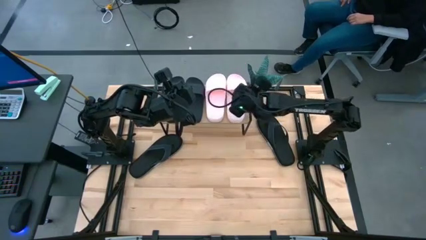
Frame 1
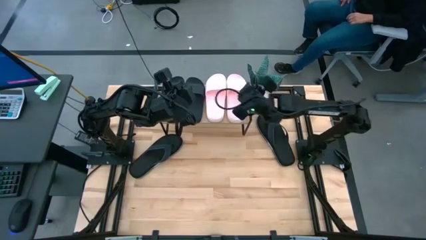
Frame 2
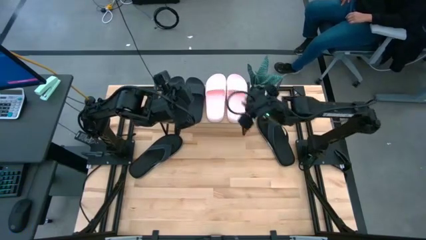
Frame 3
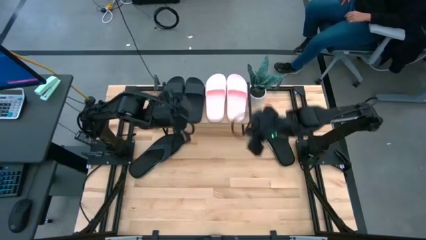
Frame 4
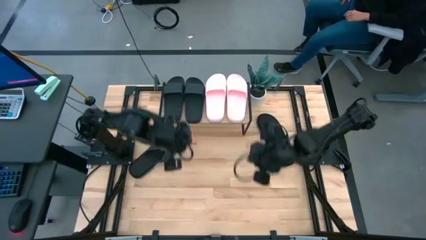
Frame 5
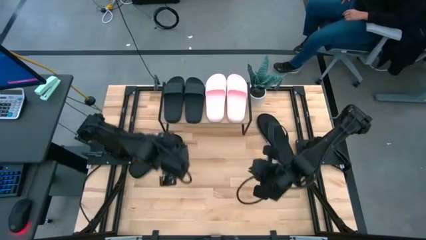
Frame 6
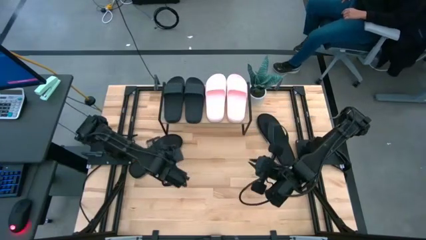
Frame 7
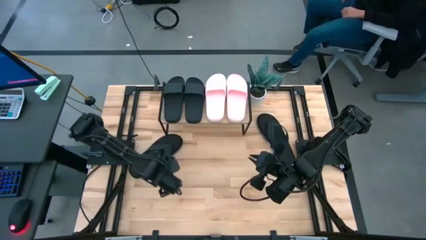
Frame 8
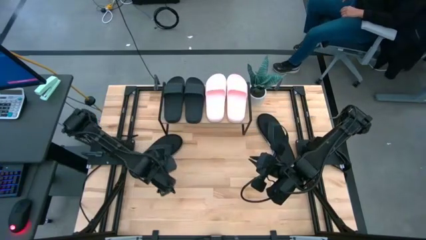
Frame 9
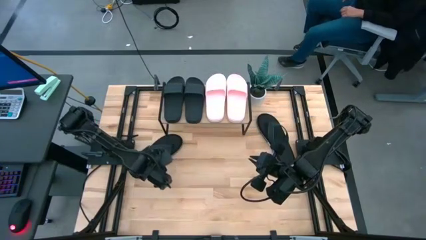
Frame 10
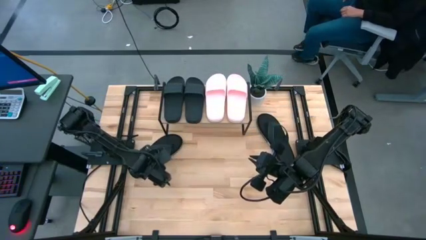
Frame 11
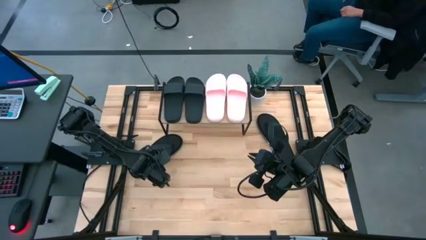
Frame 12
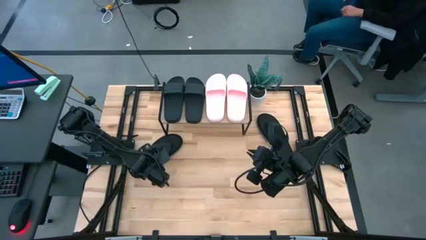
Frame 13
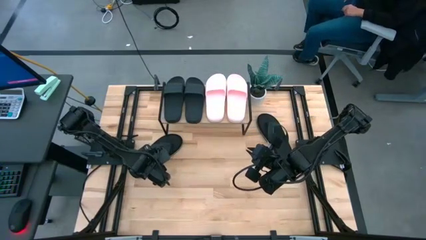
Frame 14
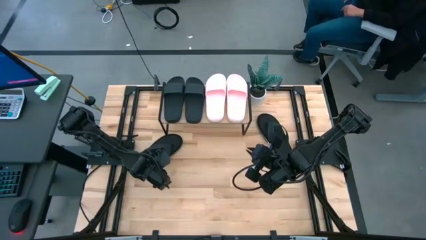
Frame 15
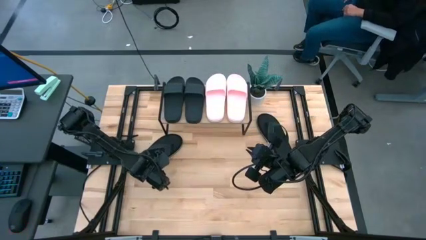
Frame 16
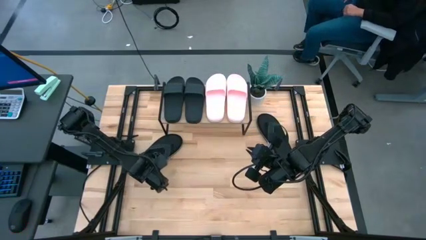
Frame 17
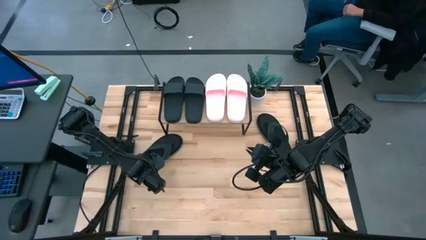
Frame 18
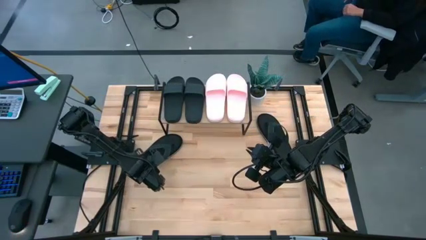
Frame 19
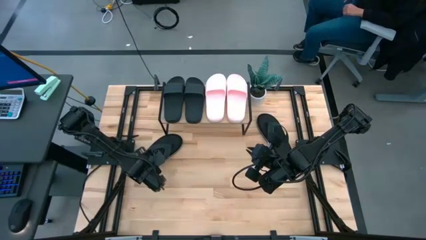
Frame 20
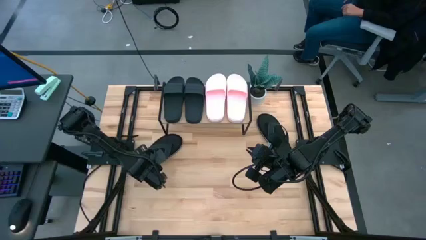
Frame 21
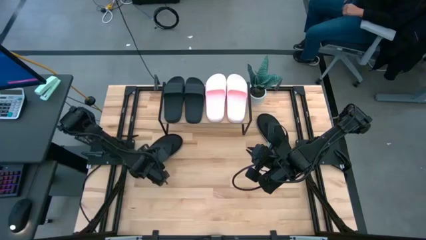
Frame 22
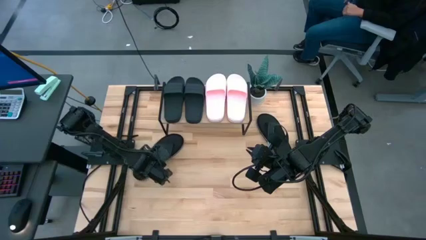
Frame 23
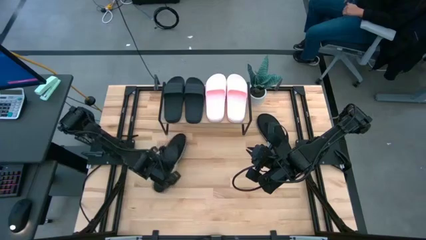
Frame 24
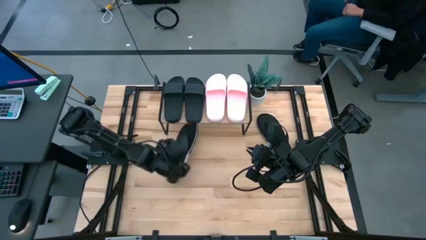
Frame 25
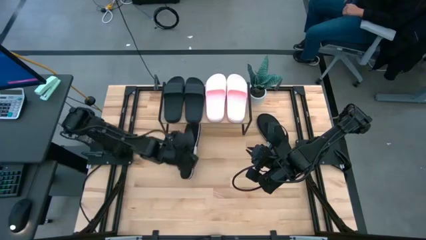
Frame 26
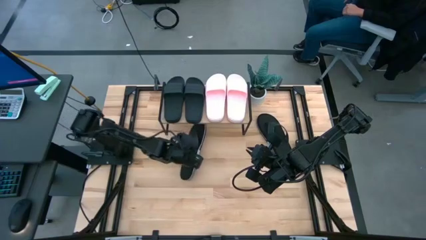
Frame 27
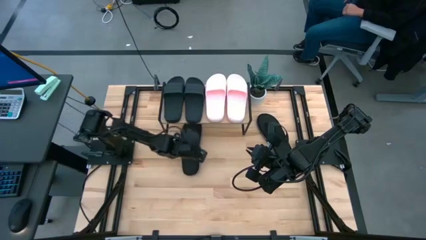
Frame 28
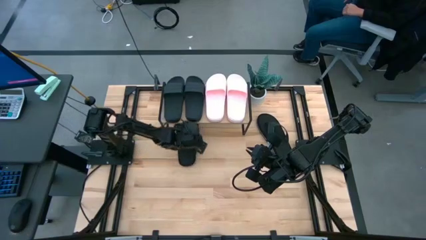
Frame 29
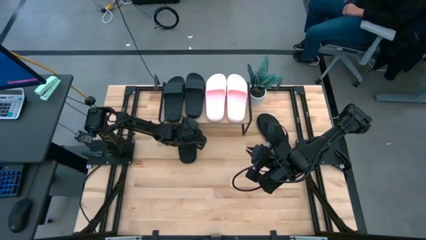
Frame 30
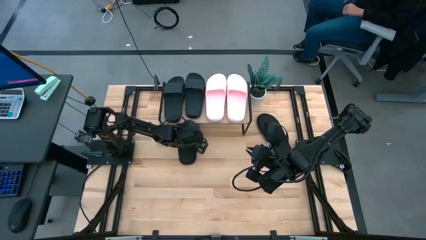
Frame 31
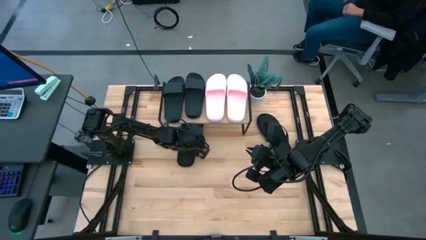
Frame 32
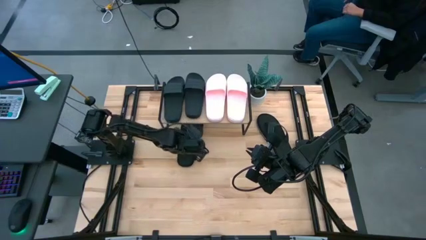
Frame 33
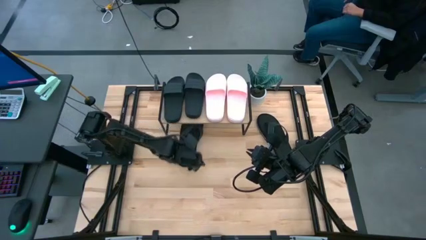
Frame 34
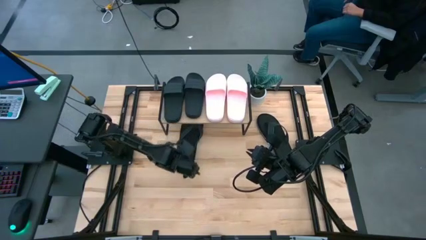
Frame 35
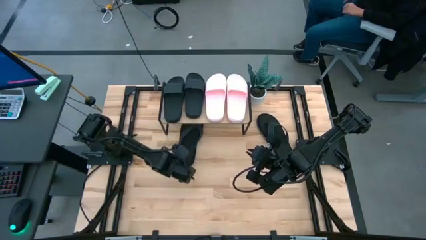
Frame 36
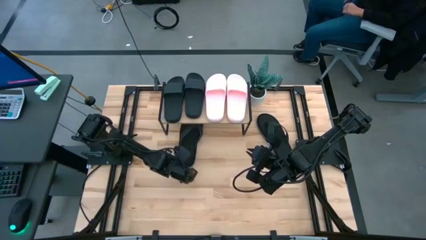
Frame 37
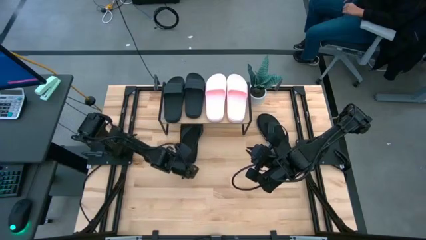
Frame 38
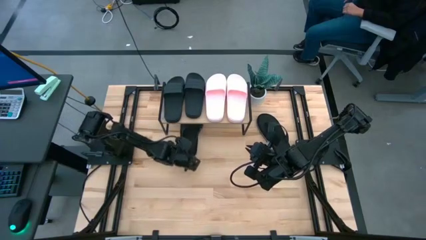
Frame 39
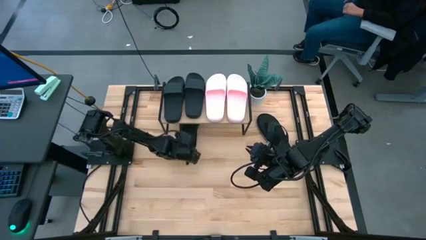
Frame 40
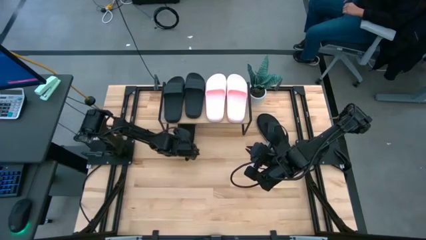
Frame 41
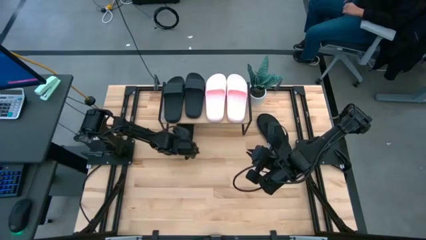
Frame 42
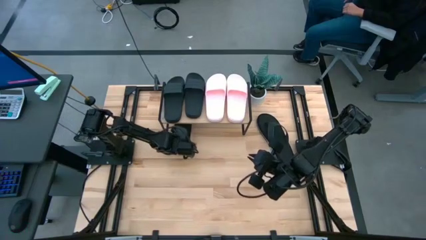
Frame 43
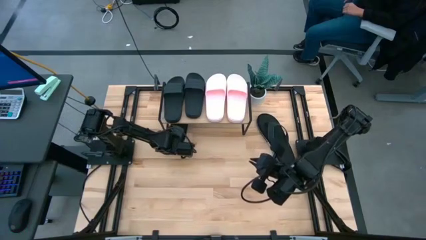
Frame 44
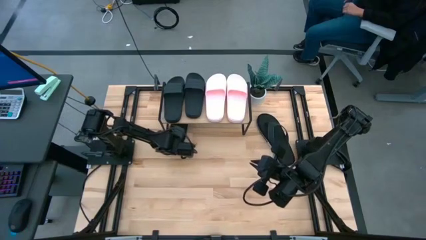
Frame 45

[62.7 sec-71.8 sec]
Task: Pick and place slides into the shelf
Put the left black slipper under the shelf

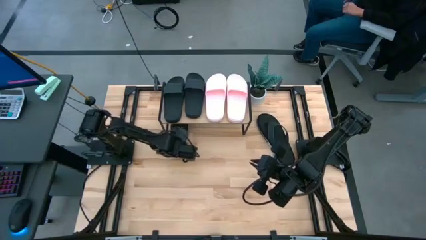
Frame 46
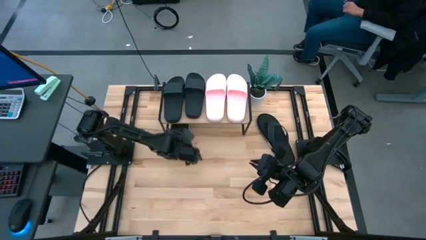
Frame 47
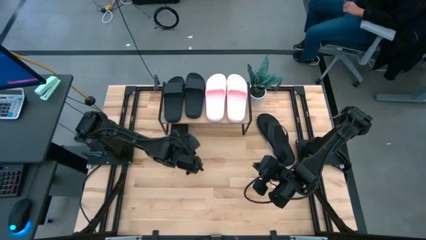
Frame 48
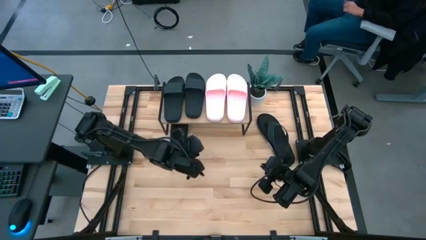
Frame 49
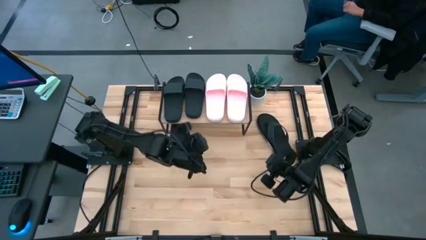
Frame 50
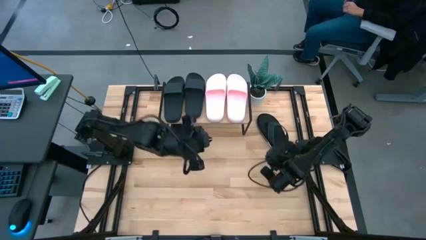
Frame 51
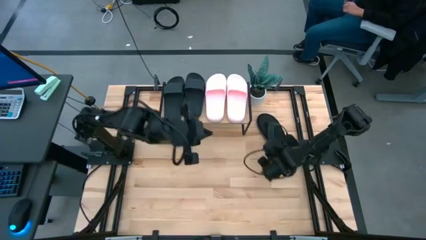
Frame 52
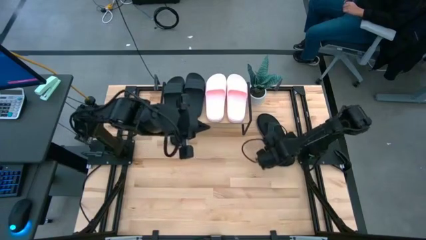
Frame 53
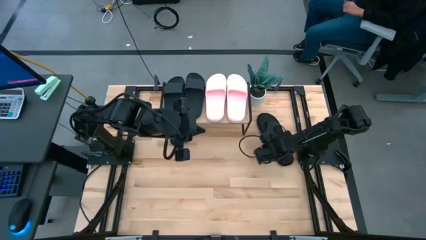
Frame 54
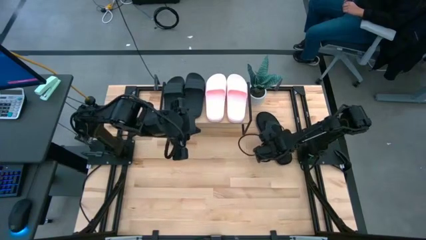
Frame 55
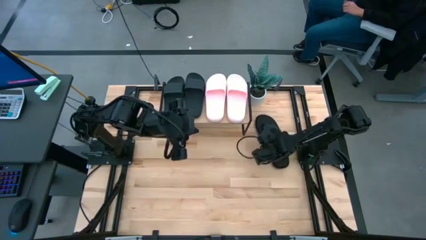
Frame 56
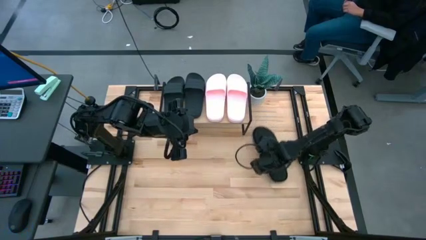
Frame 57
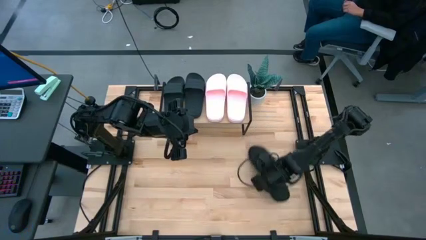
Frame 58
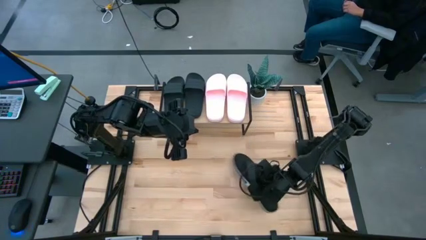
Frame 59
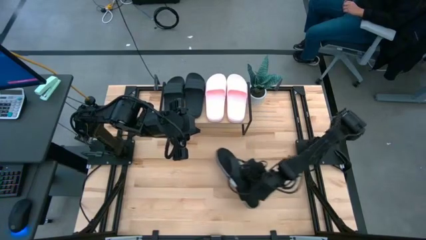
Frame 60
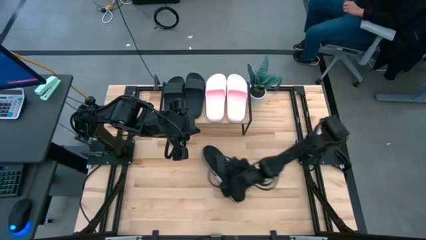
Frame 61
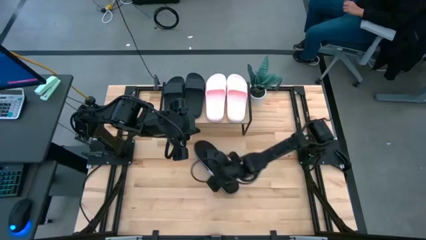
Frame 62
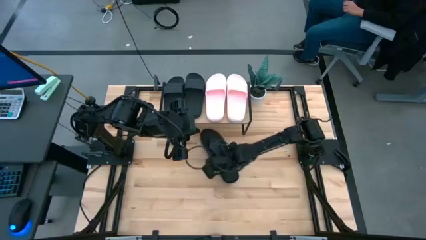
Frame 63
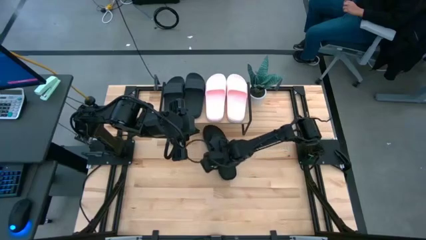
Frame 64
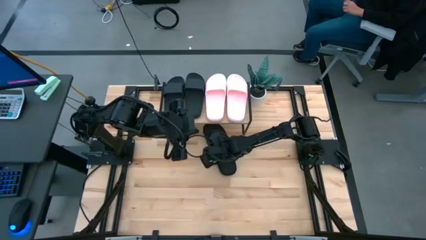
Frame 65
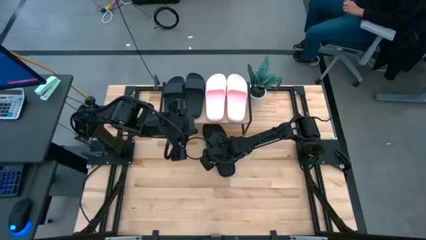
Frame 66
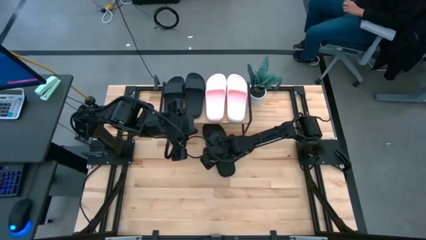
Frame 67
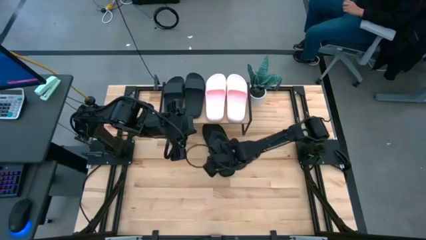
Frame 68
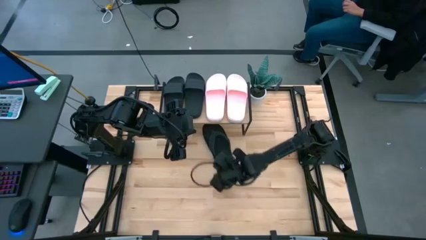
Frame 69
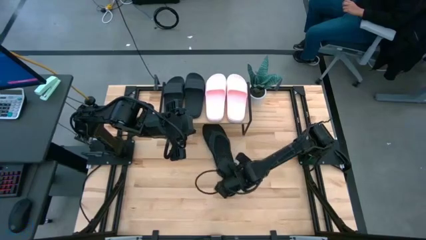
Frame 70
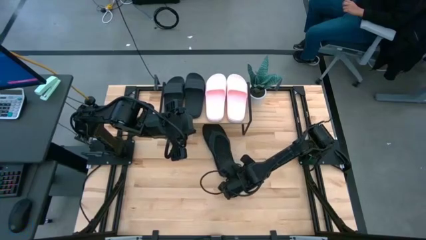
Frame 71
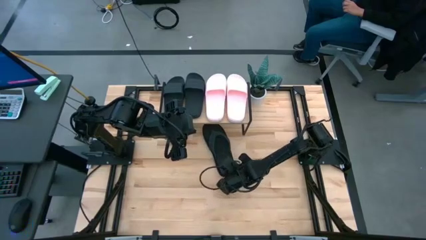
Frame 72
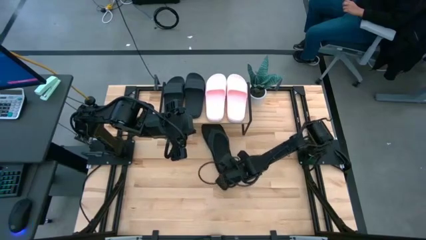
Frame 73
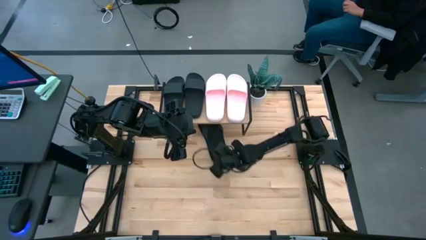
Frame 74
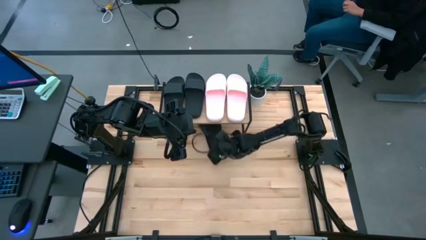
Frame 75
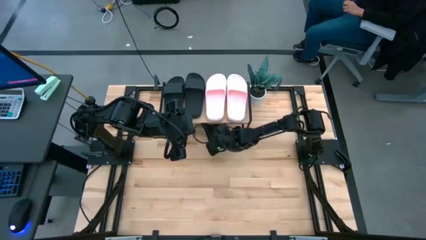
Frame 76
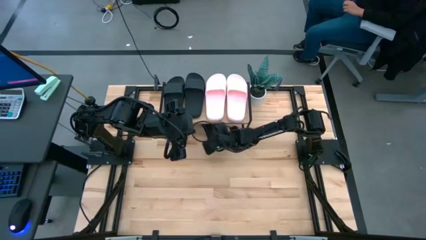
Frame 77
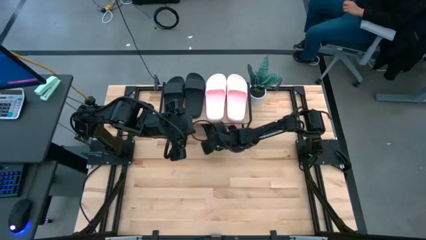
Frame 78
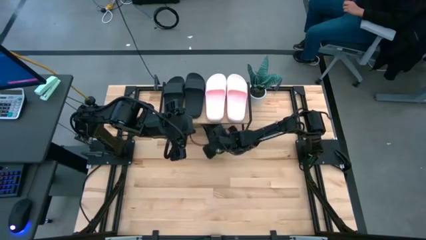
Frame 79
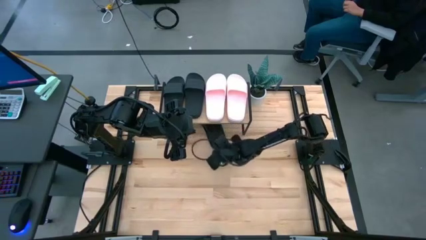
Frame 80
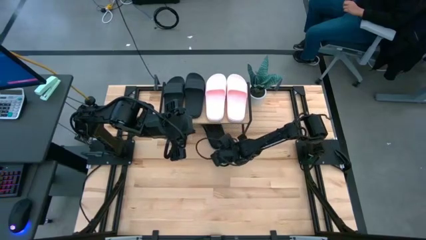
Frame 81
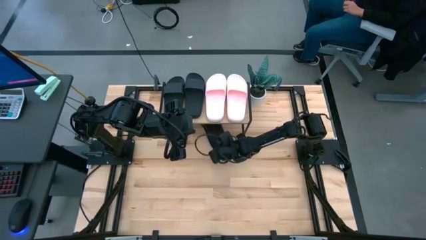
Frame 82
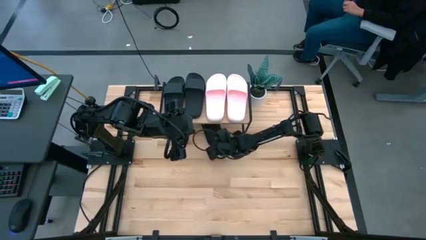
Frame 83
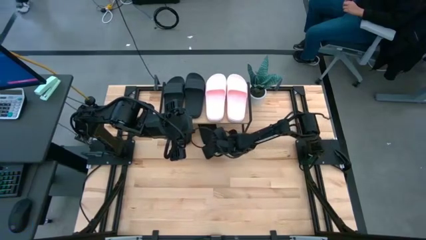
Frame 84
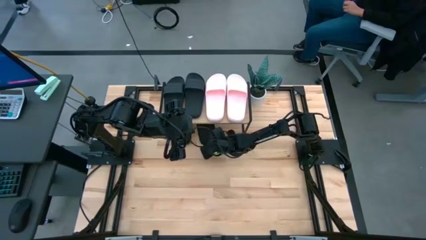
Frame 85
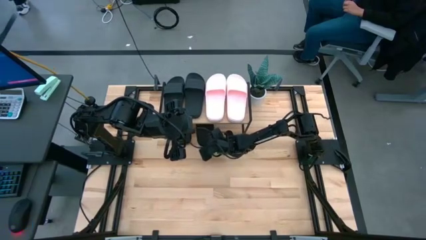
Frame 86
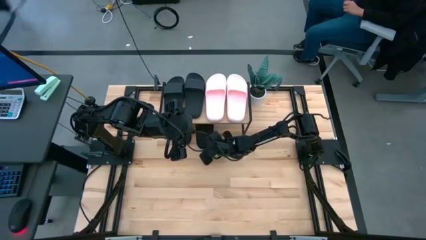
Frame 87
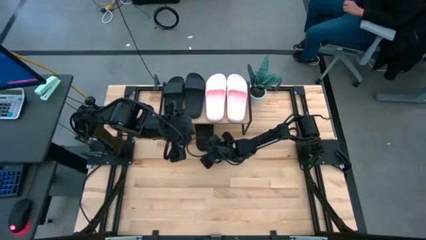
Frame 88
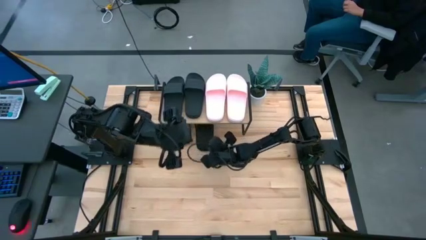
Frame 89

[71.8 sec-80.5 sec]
Put the black slipper under the shelf
